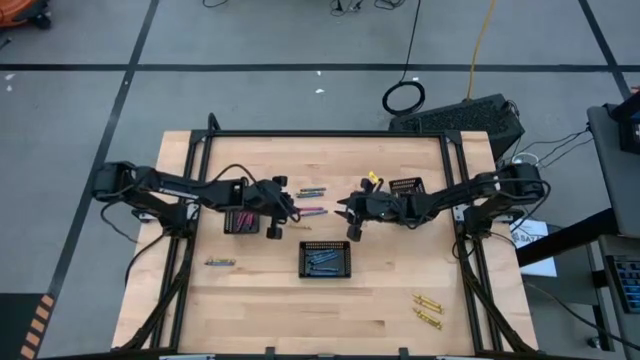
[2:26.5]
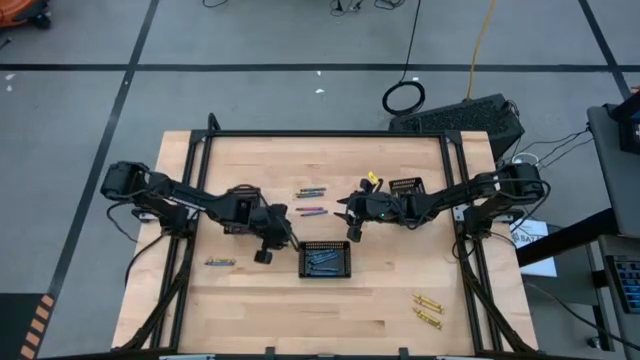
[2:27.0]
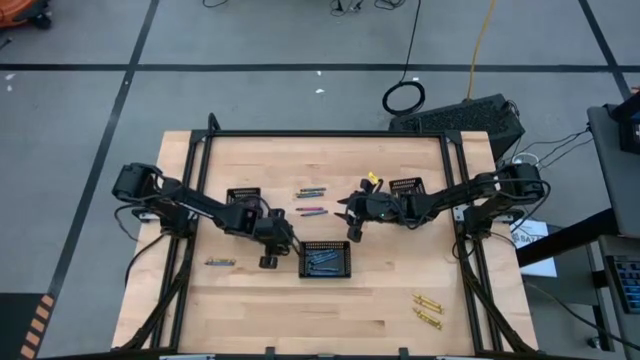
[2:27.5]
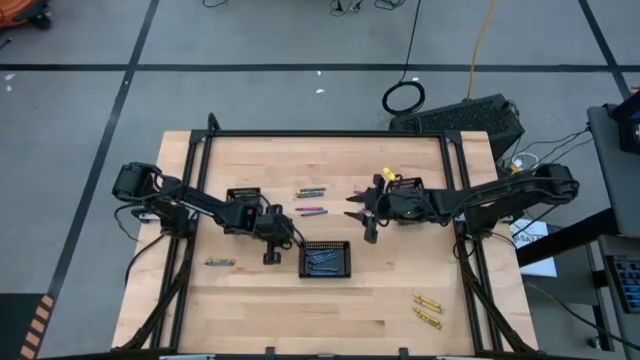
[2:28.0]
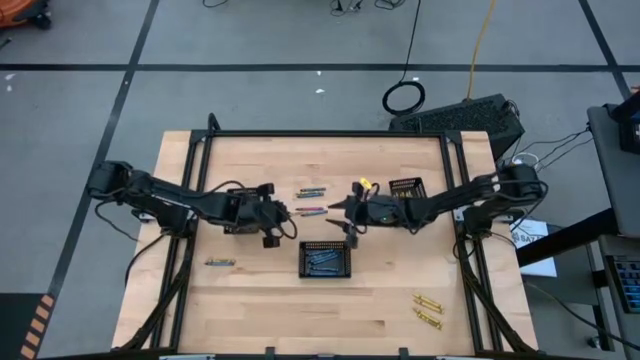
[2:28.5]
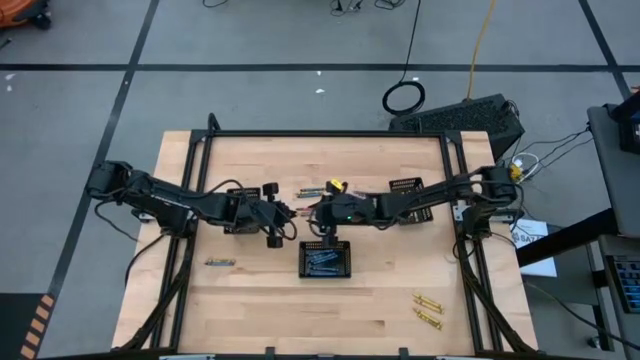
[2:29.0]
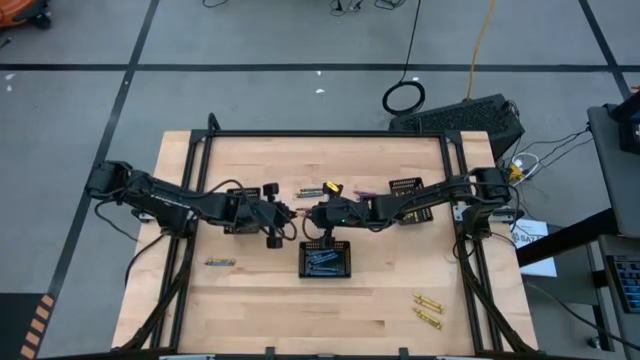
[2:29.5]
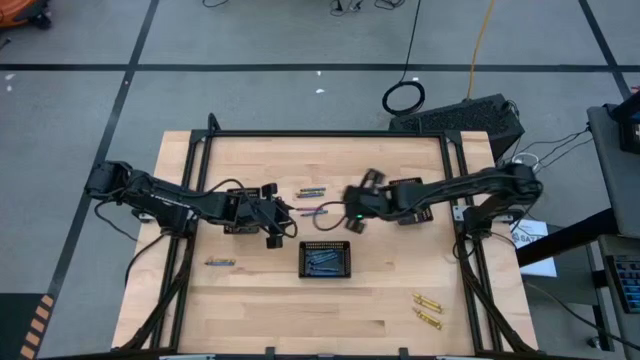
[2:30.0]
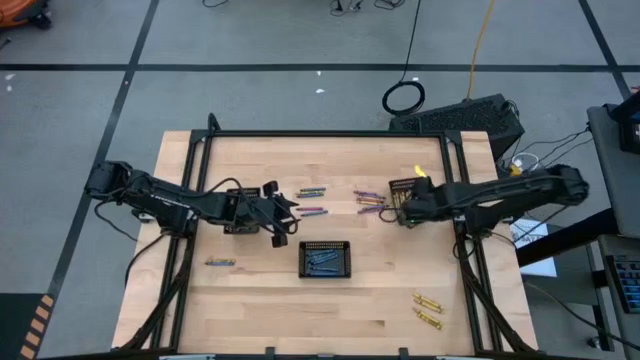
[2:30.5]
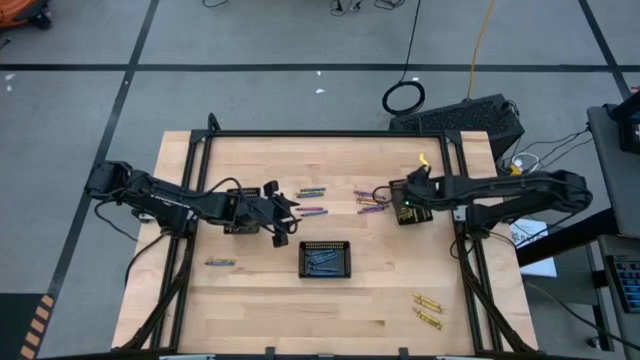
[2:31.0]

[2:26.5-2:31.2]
Task: Sort crayons
Put the yellow crayon into the right black basket

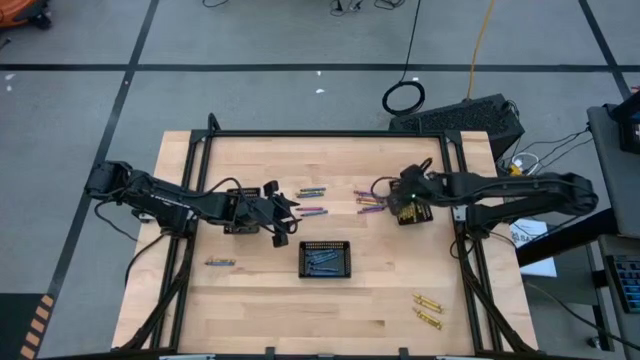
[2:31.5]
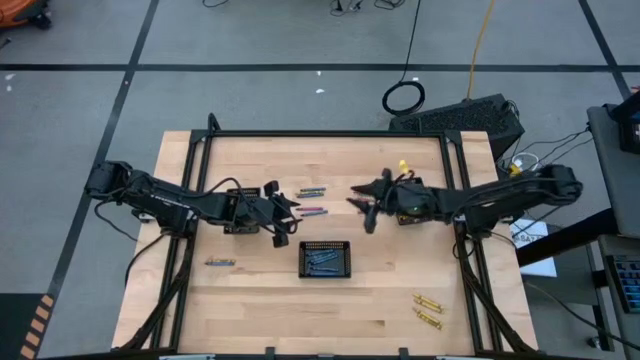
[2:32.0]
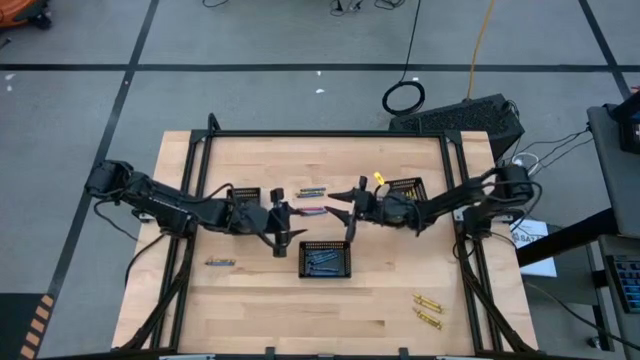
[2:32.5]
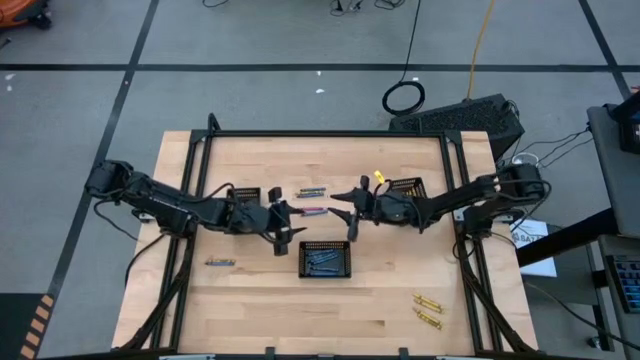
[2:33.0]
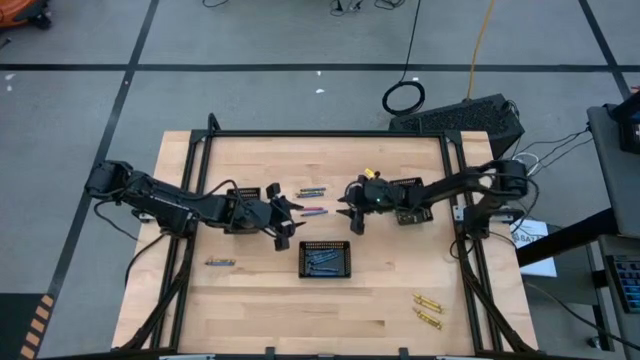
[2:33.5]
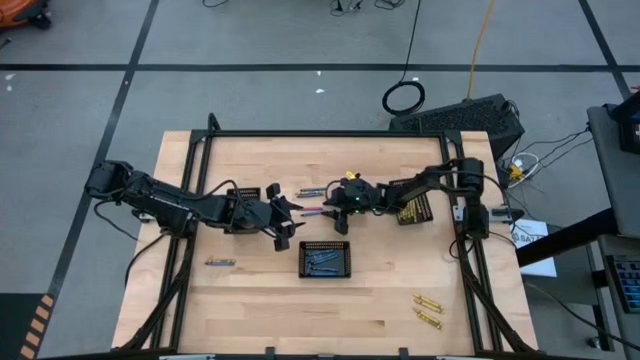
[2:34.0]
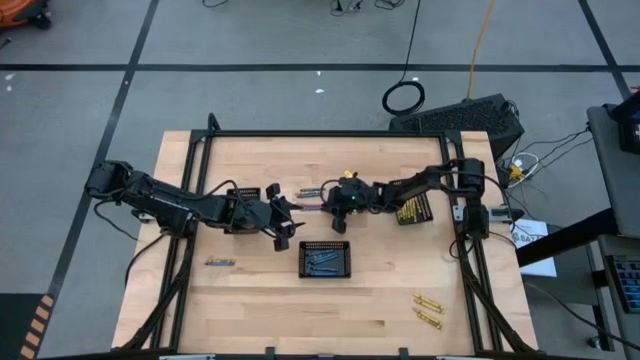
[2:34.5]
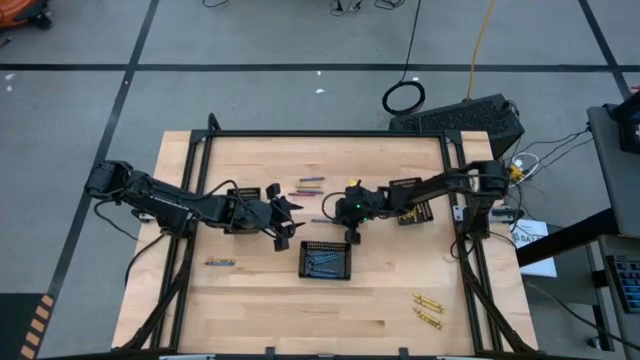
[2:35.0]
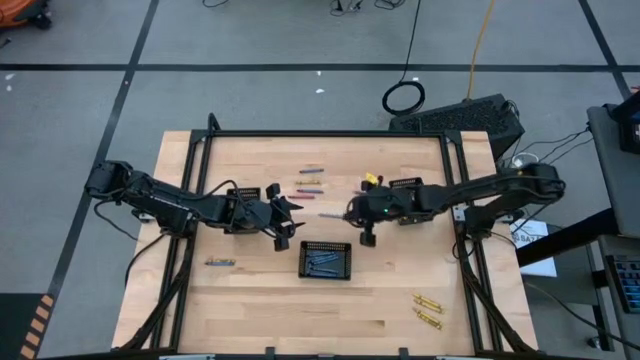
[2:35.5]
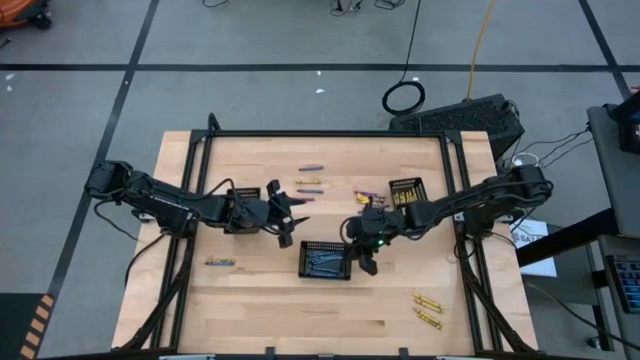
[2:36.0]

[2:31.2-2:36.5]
Put the blue crayon into the center black basket

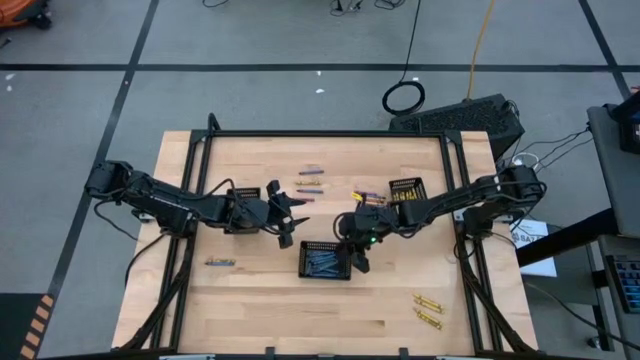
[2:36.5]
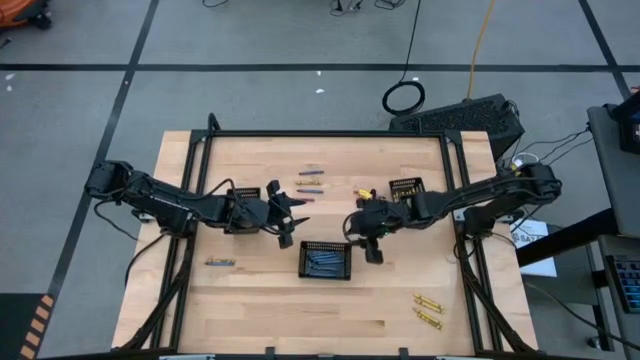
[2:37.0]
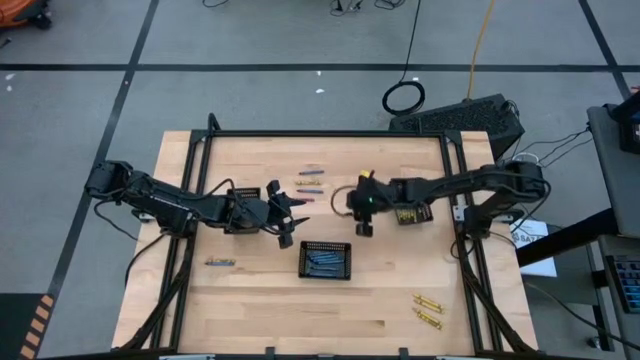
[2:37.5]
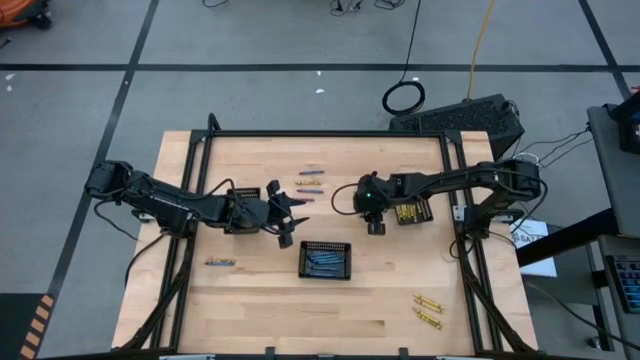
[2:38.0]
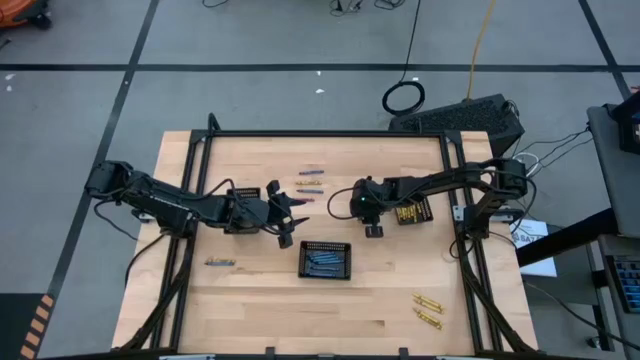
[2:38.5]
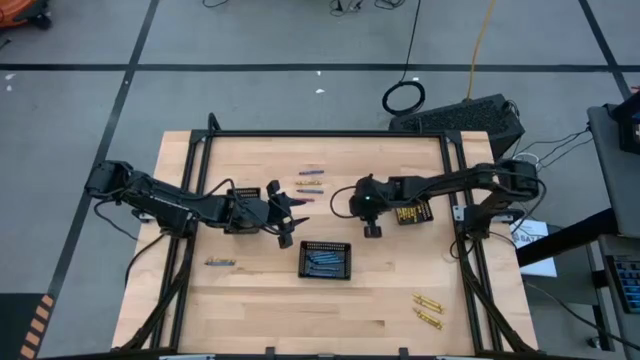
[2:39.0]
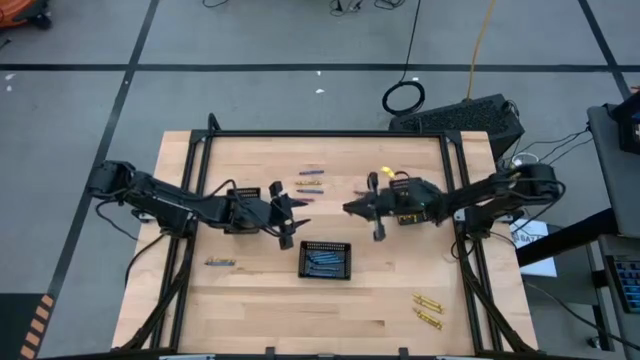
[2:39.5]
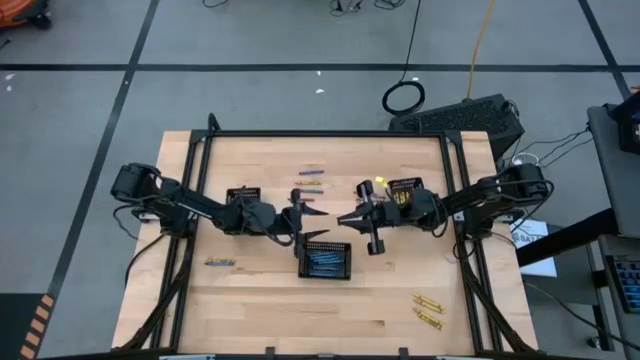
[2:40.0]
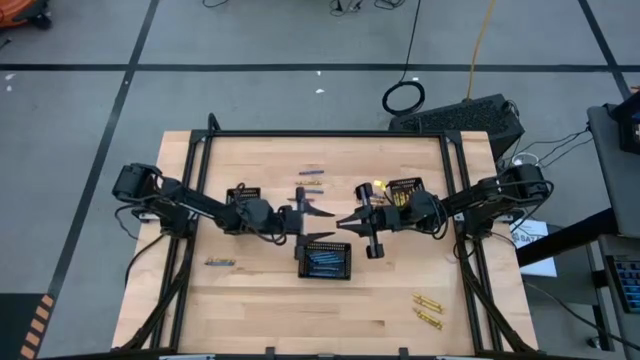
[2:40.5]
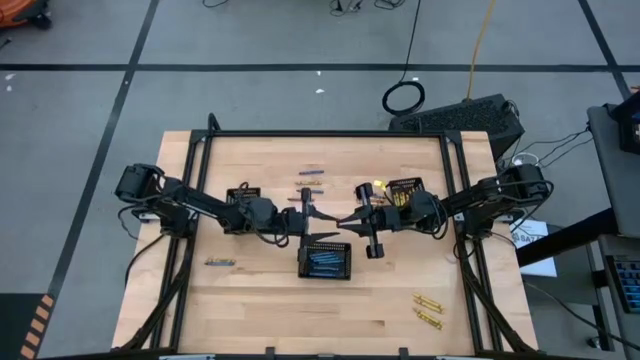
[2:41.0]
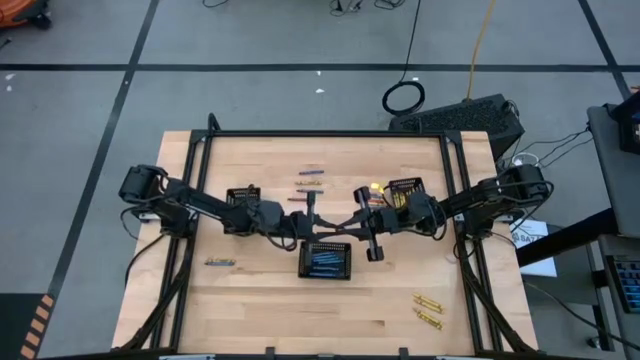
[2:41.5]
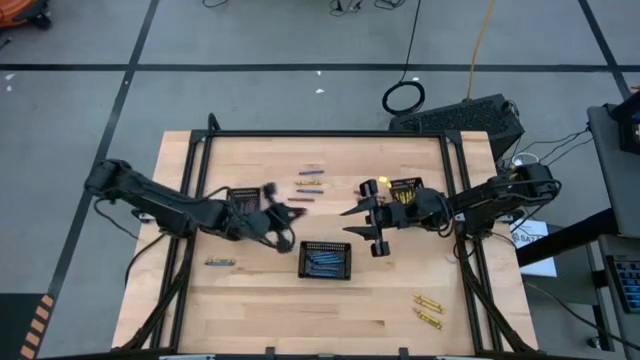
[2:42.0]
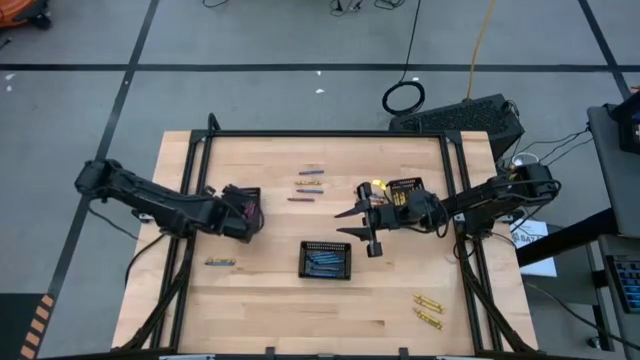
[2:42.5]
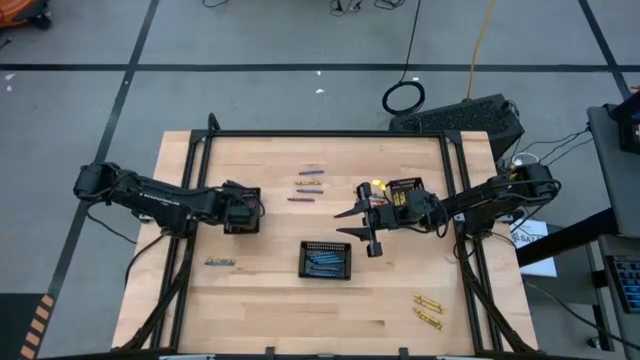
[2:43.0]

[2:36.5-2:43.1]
Put the red crayon into the left black basket

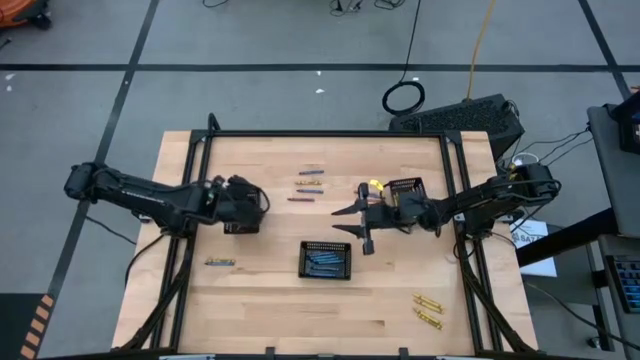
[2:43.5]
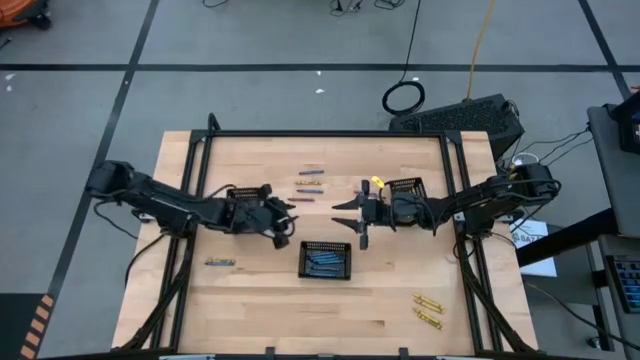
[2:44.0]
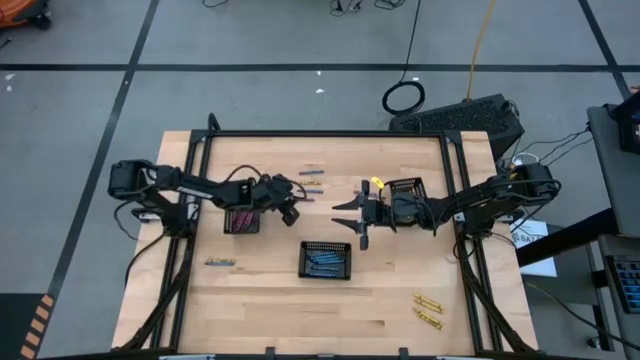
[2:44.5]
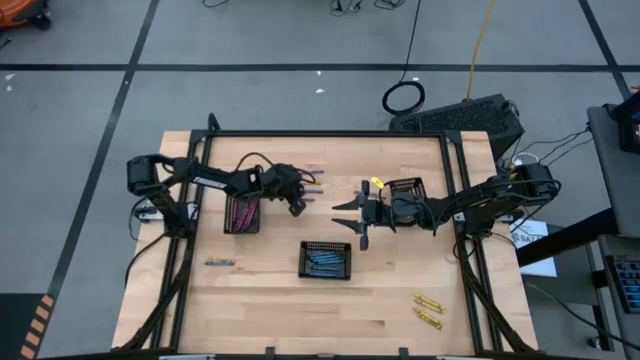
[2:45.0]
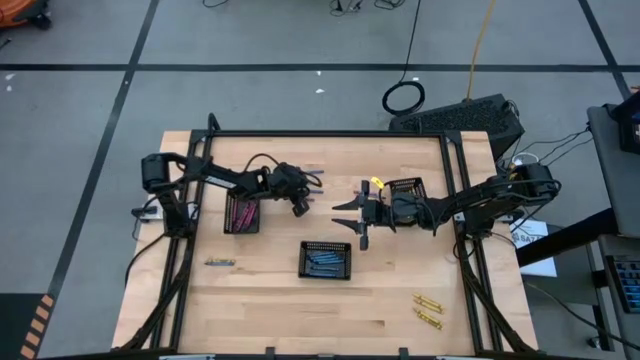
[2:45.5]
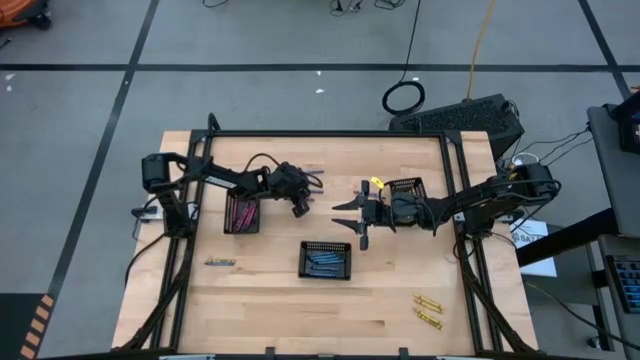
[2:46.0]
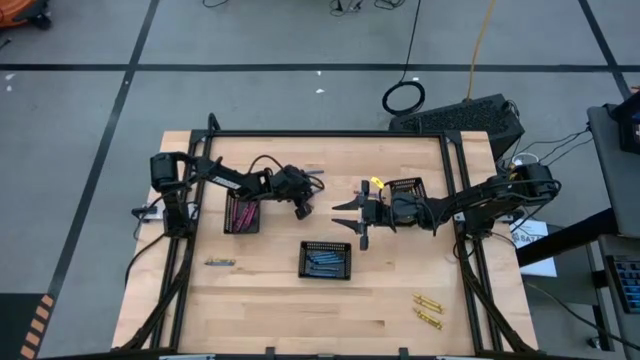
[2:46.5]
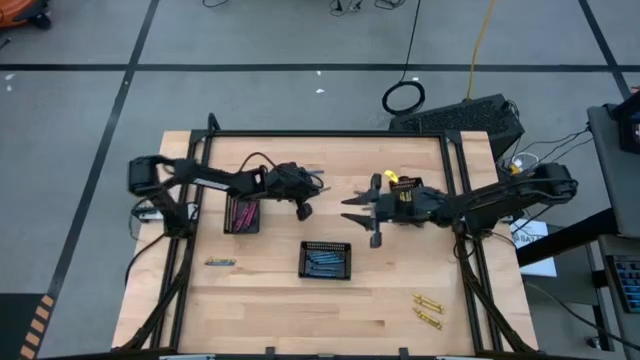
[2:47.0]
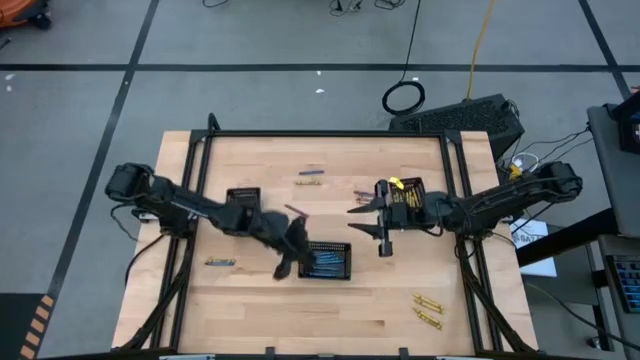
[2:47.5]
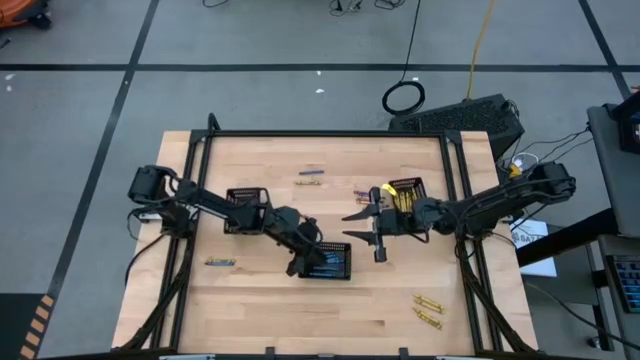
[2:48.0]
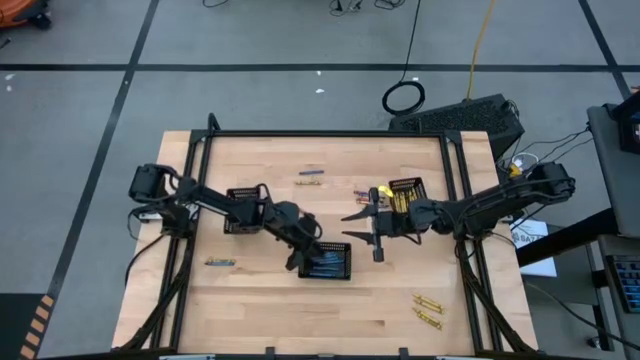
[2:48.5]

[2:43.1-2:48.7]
Put the blue crayon into the center black basket
